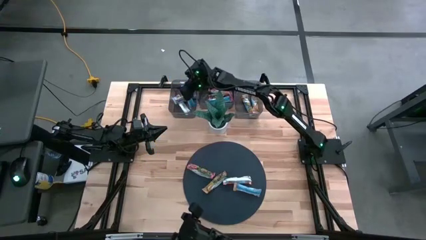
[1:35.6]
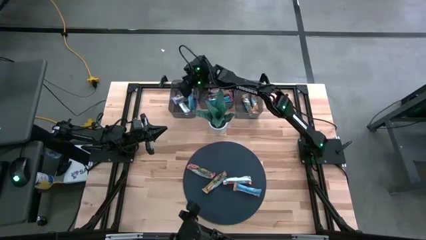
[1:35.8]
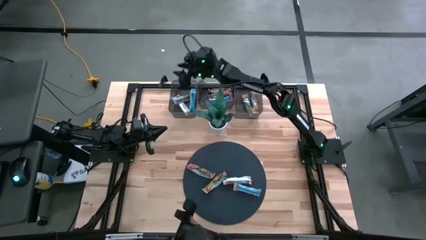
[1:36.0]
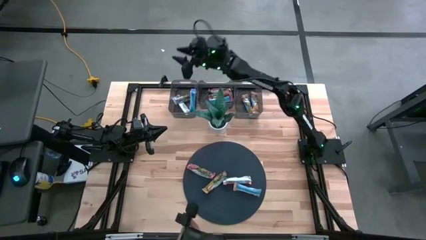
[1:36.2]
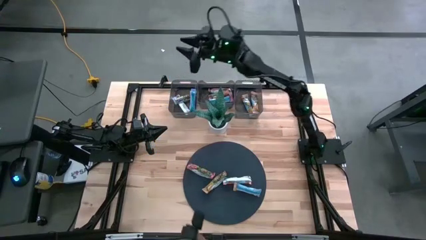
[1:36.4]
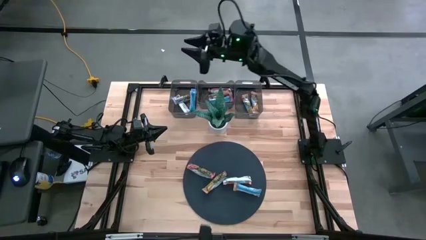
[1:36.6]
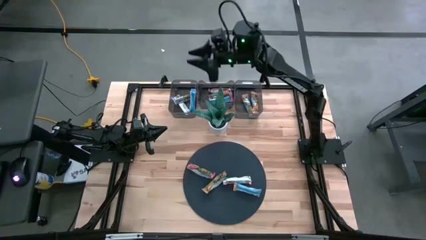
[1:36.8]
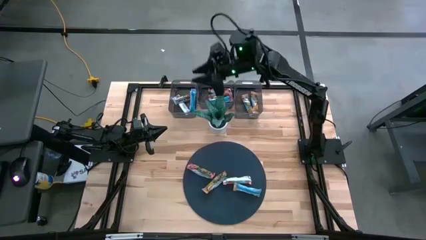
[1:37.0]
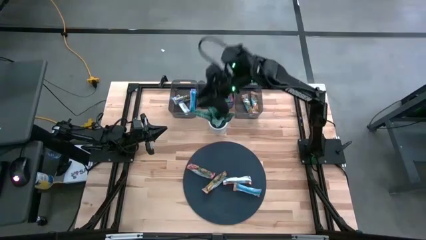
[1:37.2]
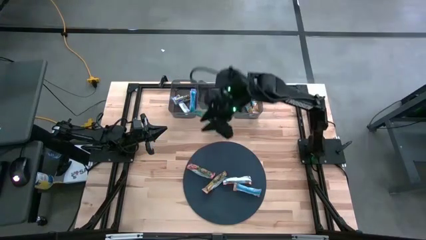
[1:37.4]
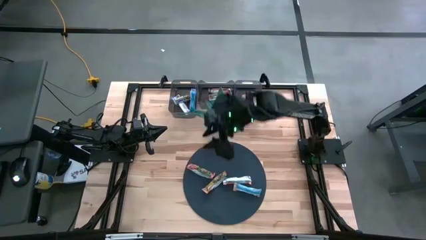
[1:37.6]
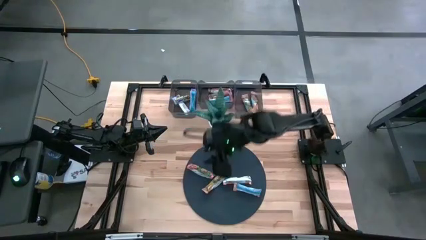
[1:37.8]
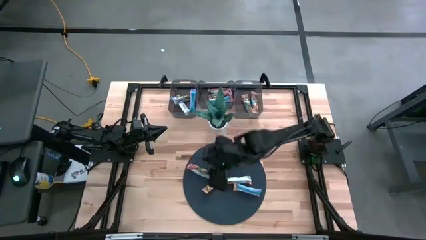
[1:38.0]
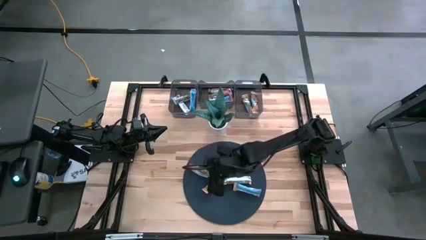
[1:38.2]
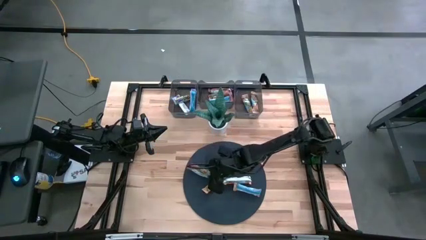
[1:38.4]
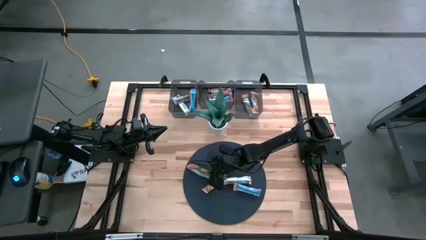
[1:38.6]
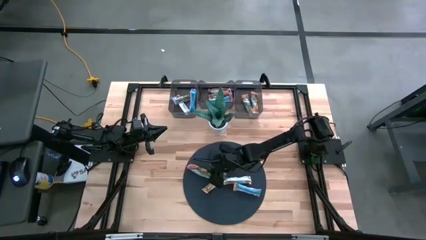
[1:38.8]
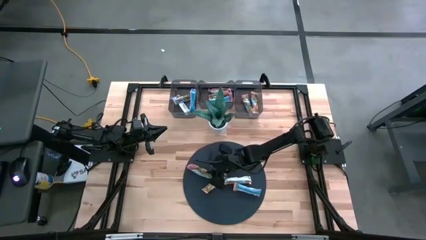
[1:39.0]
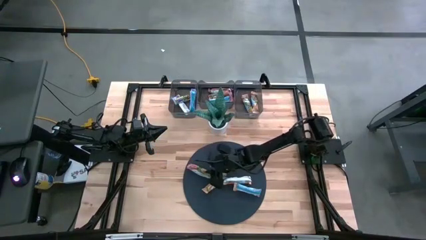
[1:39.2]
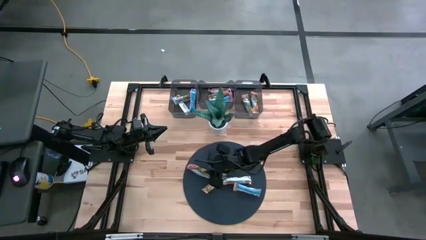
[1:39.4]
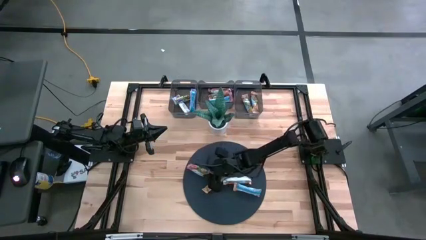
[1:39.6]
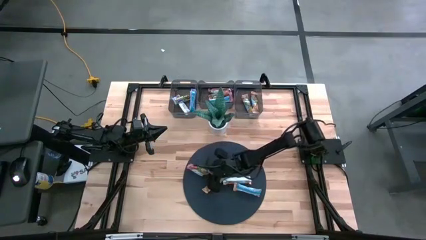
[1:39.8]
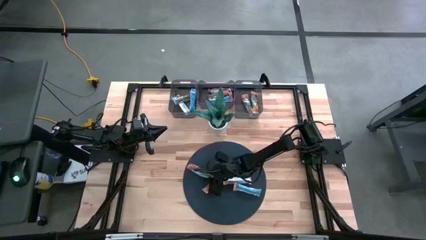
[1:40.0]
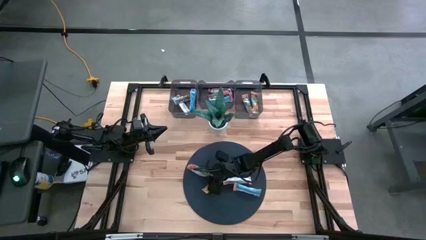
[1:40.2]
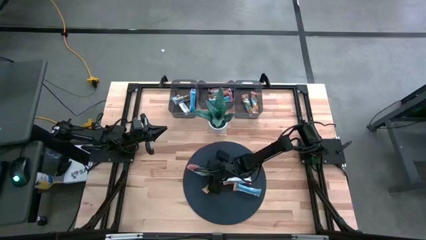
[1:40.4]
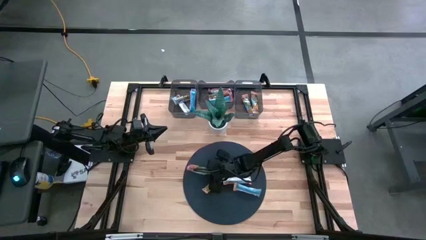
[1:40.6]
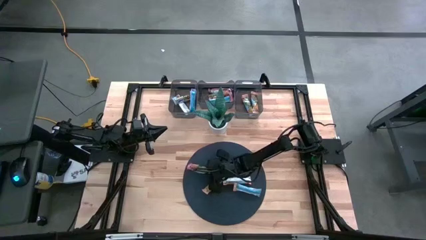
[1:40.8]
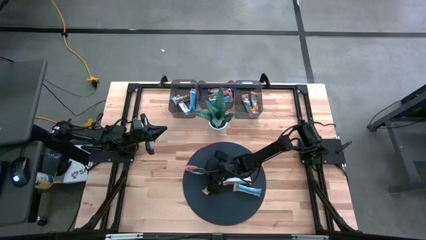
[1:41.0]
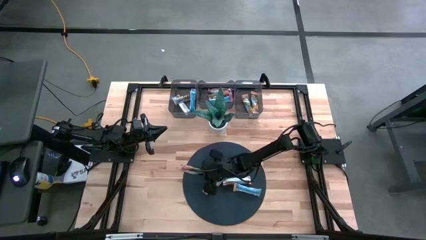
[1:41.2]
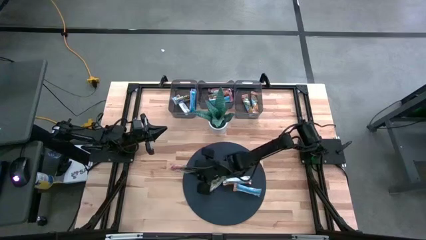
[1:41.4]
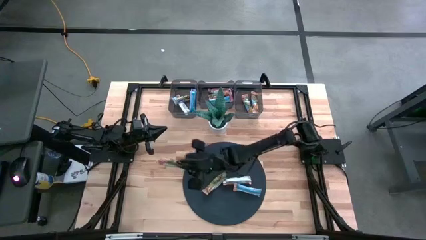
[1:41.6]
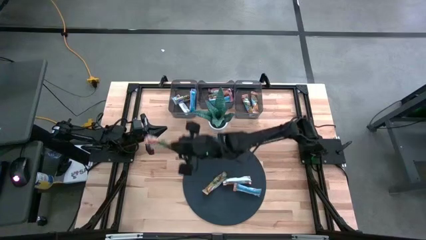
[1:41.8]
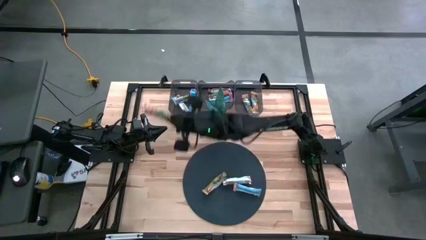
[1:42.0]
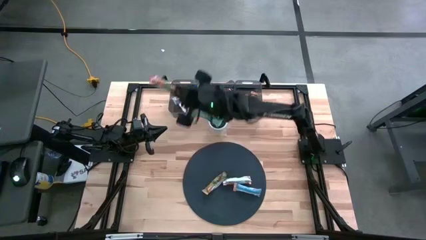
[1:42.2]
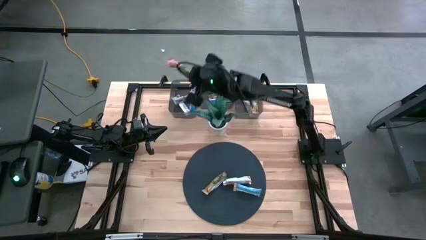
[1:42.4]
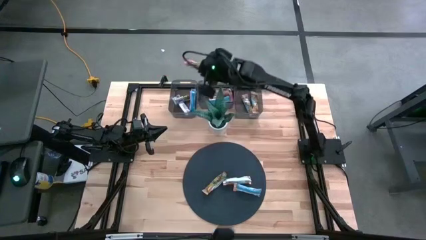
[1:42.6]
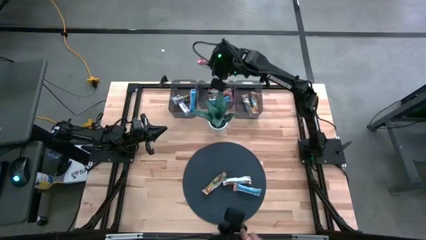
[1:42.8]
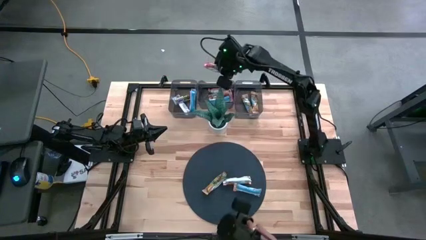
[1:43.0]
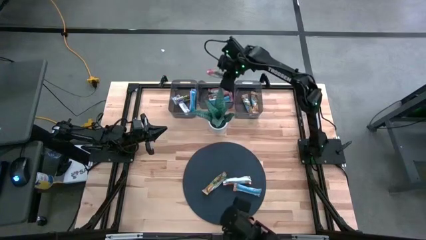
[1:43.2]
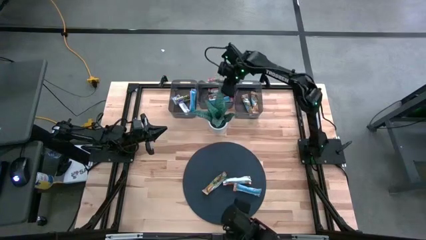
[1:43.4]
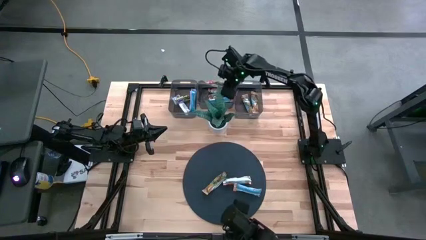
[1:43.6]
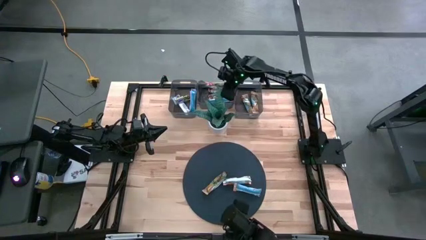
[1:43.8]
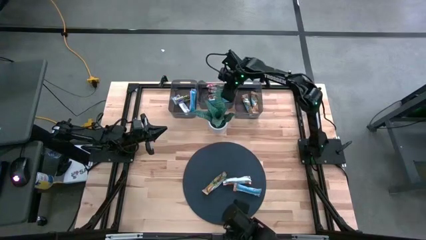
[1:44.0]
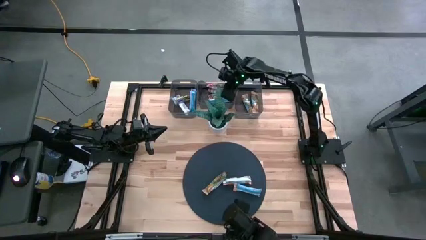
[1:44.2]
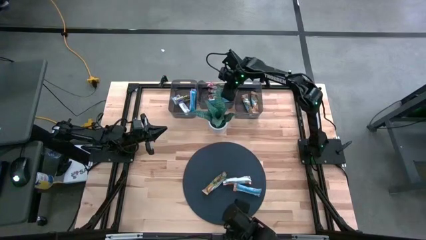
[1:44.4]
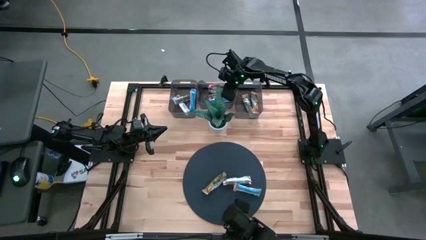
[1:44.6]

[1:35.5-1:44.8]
Task: Pick and place Granola Bars by type
Put the red granola bar into the middle black bin

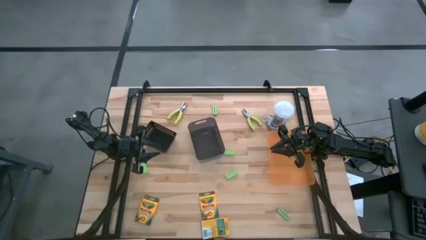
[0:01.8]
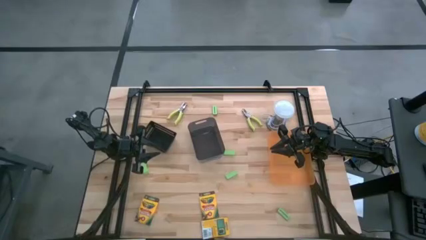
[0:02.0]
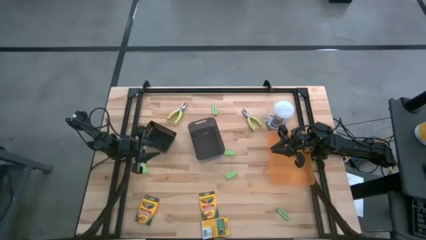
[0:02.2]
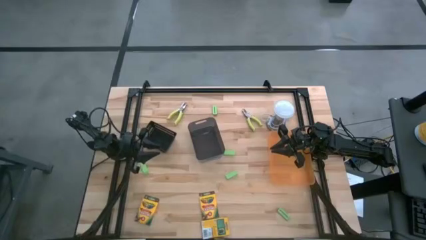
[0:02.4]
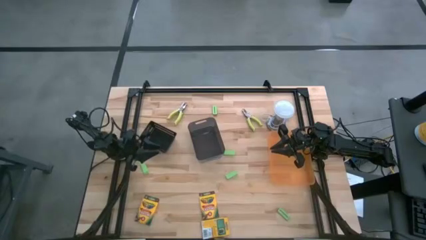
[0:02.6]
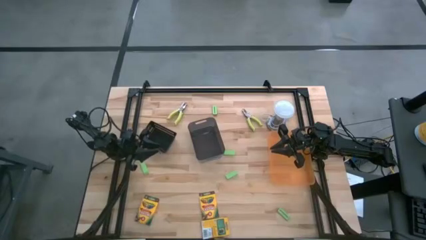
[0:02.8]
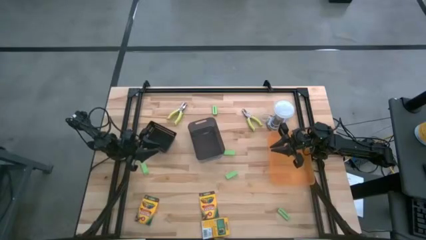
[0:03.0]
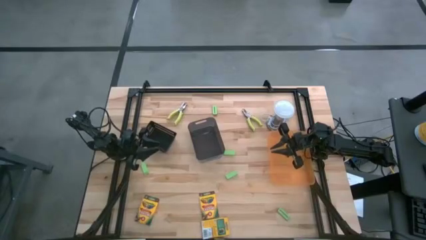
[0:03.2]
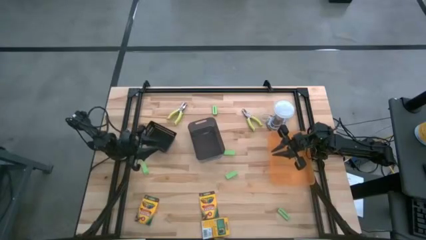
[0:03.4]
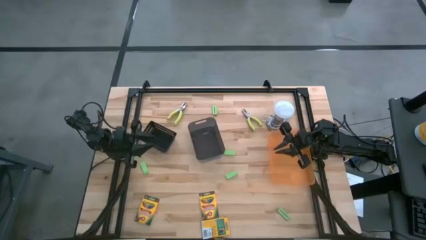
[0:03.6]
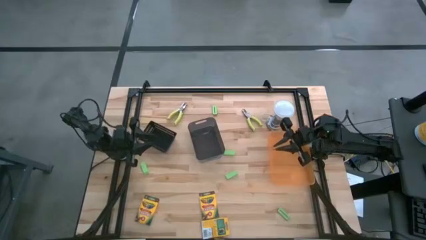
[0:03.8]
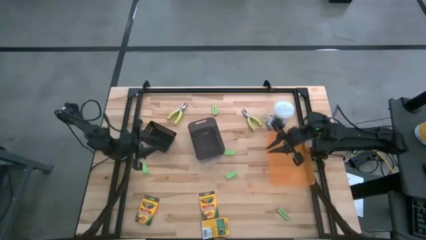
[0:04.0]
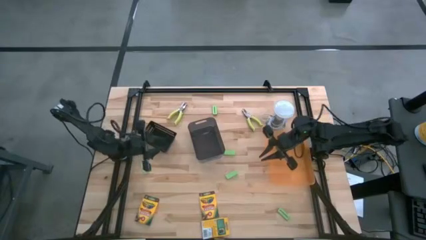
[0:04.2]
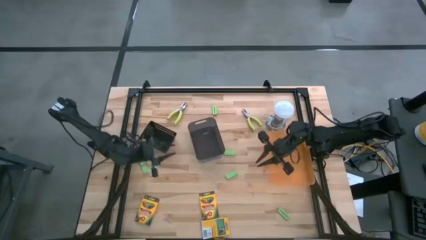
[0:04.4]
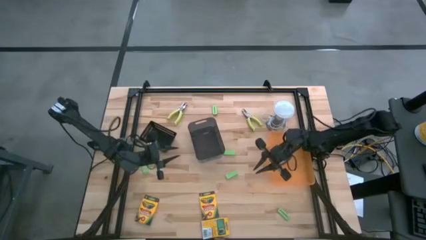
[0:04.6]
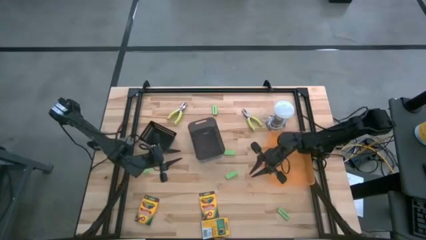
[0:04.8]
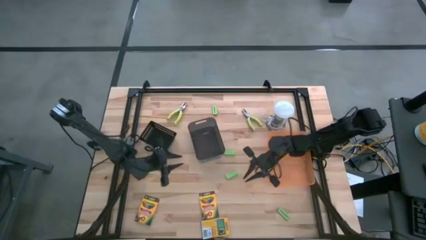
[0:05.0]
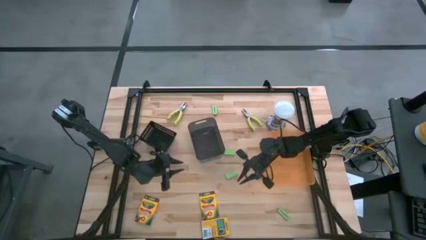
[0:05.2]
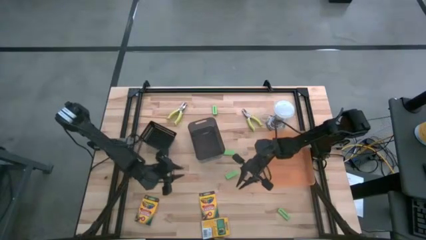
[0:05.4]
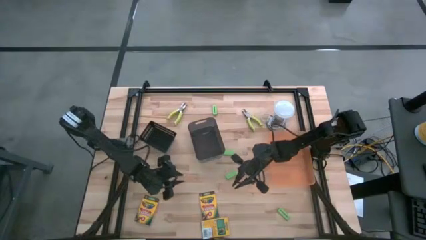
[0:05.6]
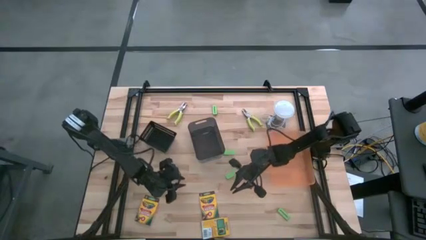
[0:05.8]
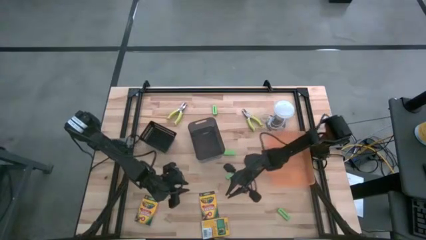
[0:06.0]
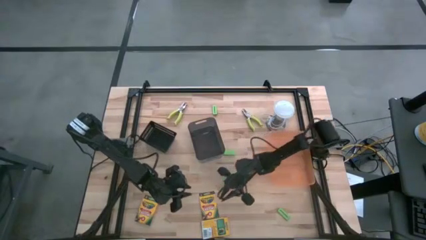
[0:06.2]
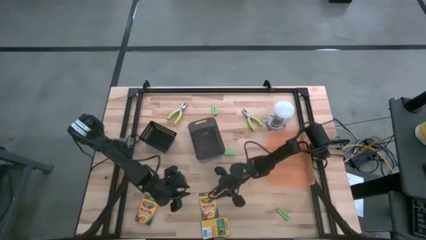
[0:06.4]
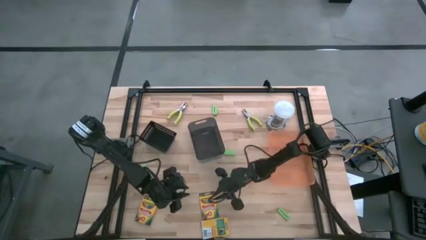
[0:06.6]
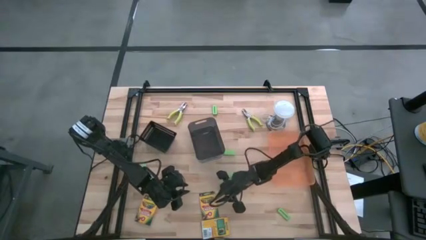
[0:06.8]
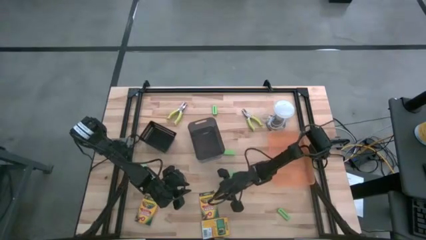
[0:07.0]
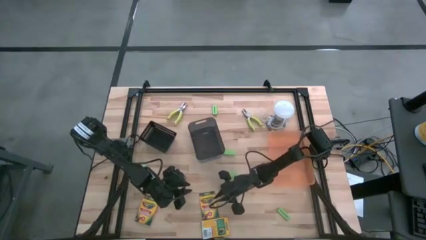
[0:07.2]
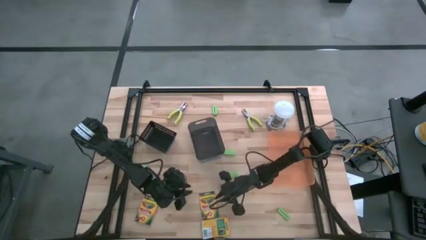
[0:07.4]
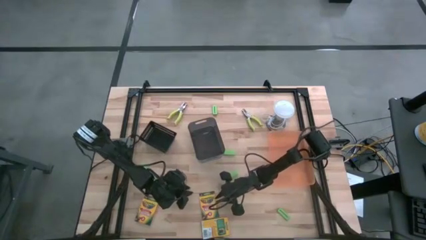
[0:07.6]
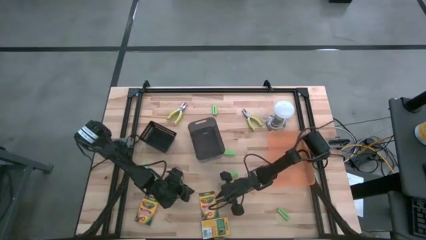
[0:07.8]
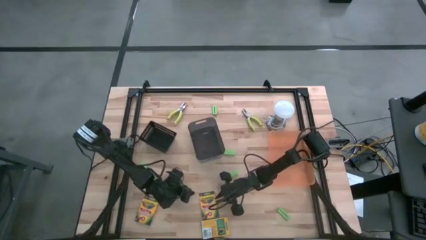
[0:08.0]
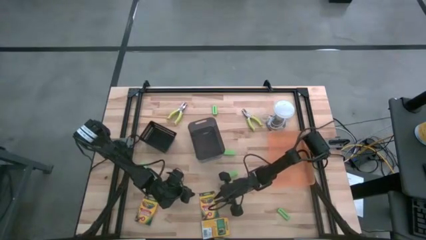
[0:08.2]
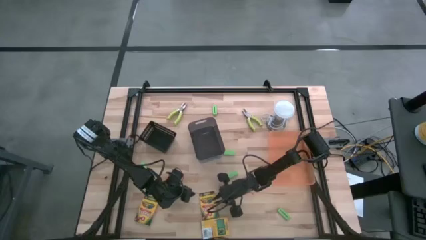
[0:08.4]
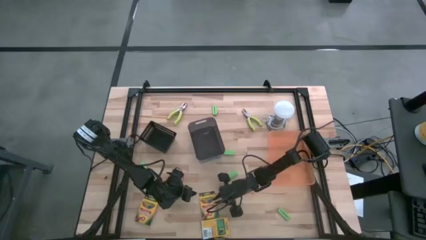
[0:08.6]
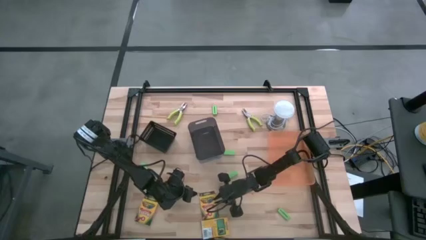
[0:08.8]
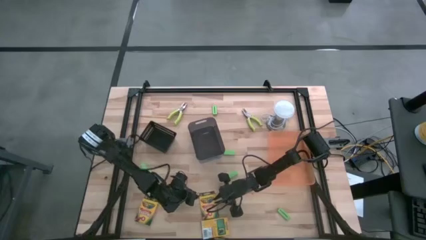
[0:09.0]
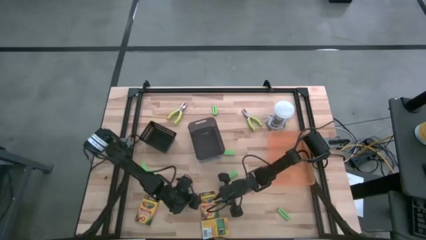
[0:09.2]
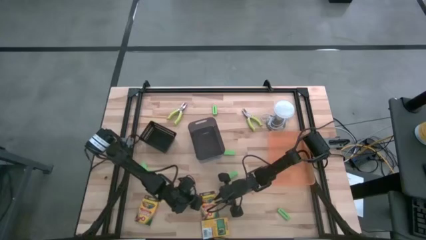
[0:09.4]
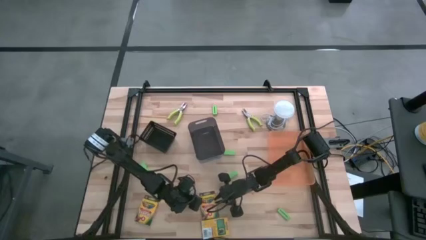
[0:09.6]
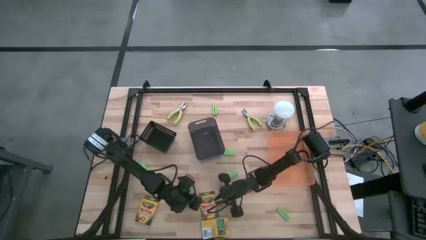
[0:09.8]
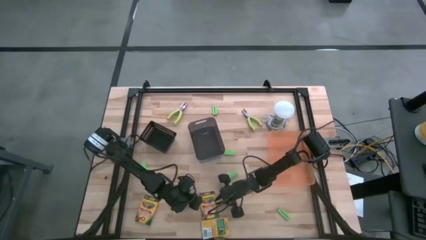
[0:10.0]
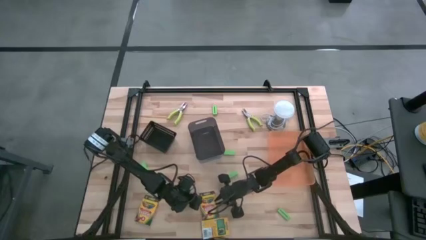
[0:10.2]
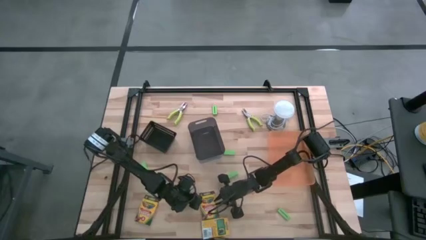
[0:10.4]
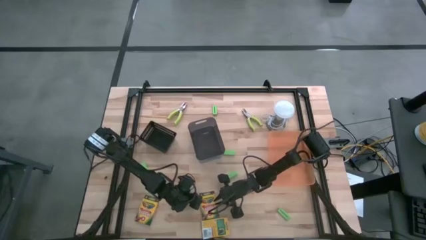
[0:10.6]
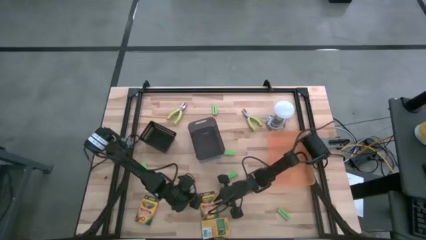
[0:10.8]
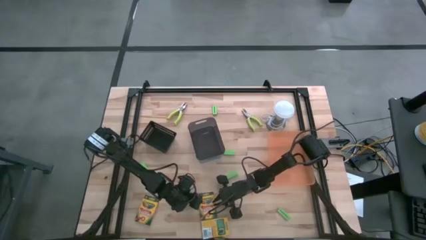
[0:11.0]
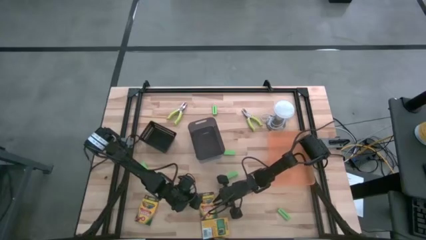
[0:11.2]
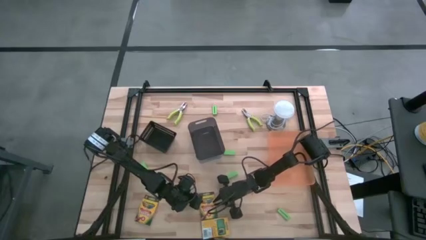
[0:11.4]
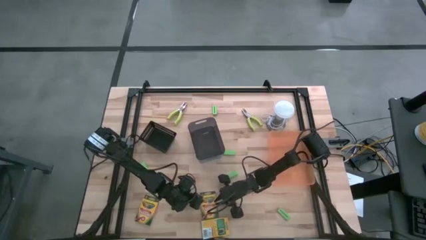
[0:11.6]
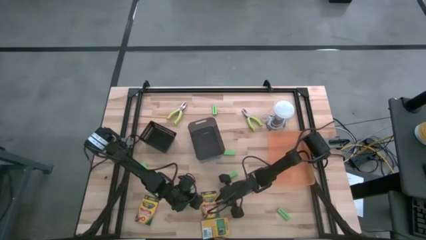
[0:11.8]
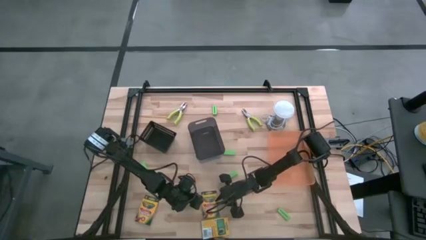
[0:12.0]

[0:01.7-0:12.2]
Task: Pick & Place School Supplies
Put the top right yellow crayon box into the black transparent bin
